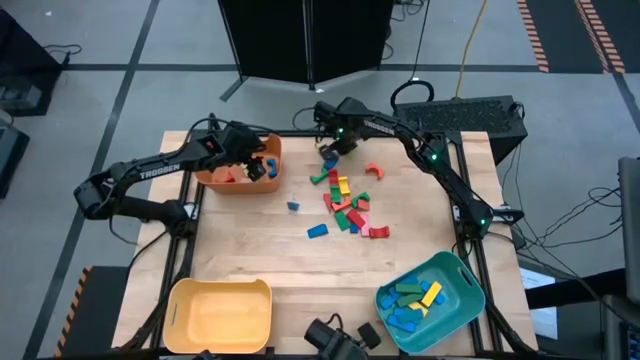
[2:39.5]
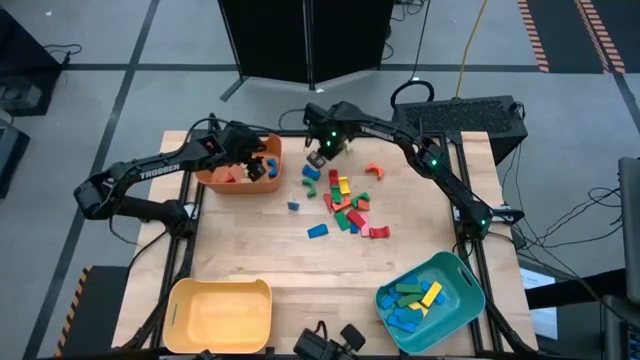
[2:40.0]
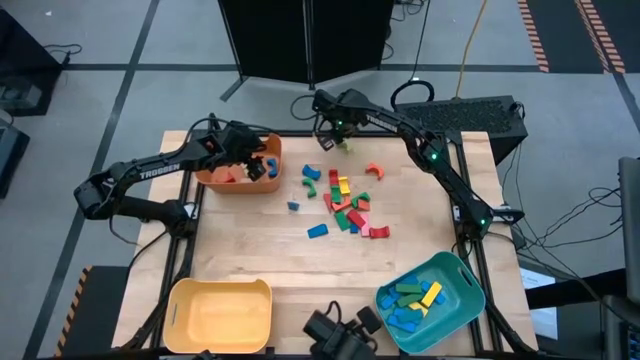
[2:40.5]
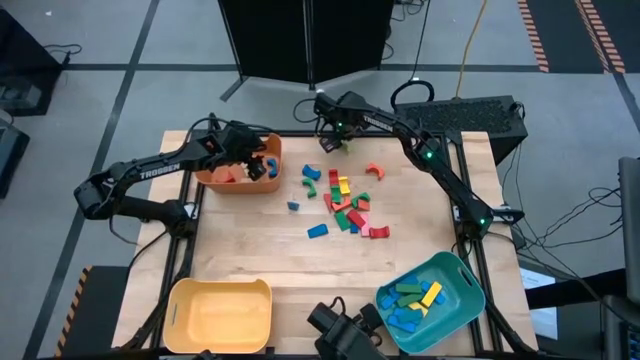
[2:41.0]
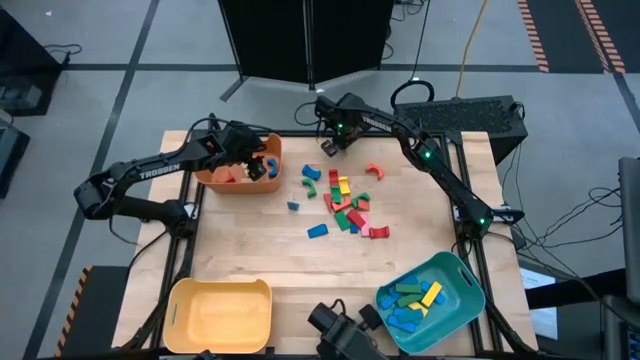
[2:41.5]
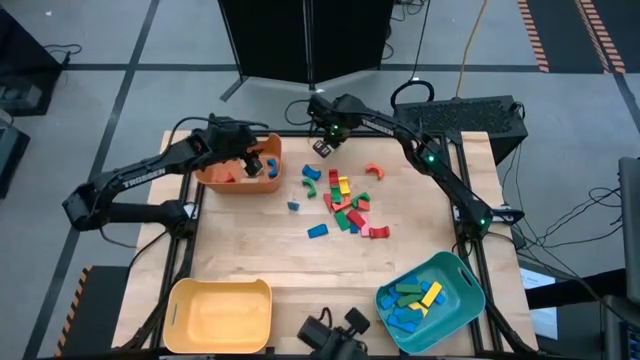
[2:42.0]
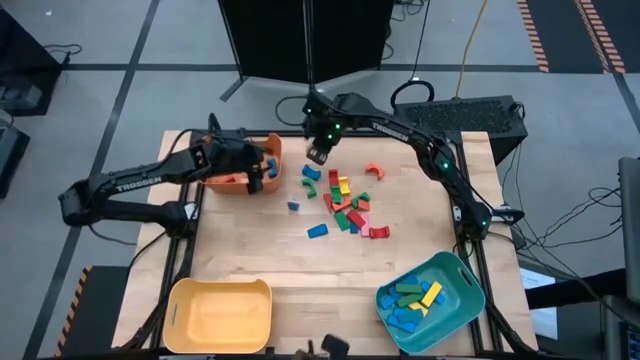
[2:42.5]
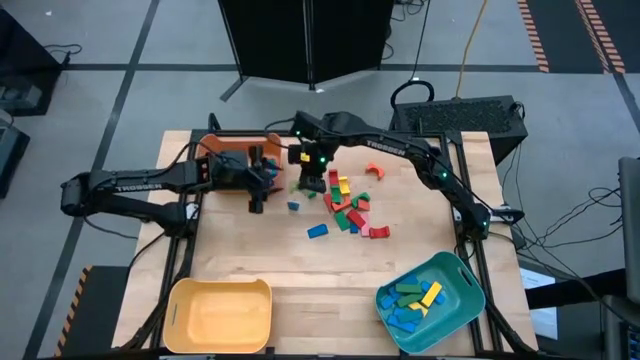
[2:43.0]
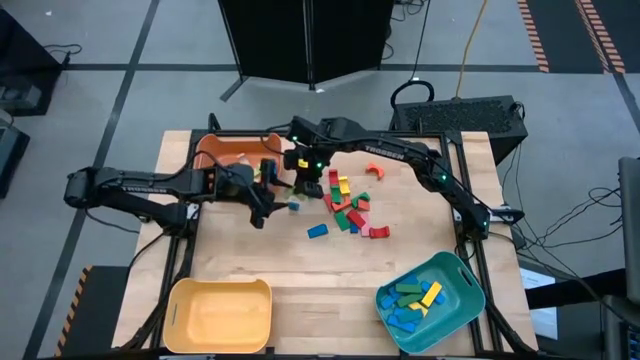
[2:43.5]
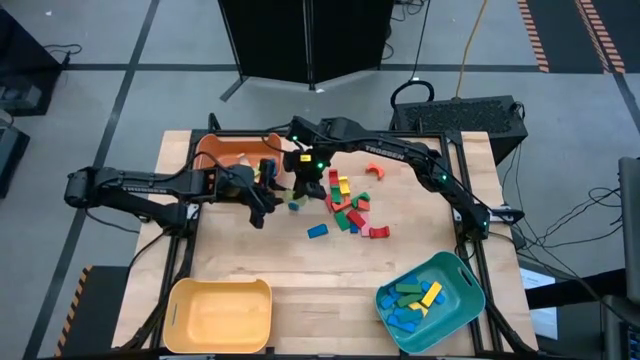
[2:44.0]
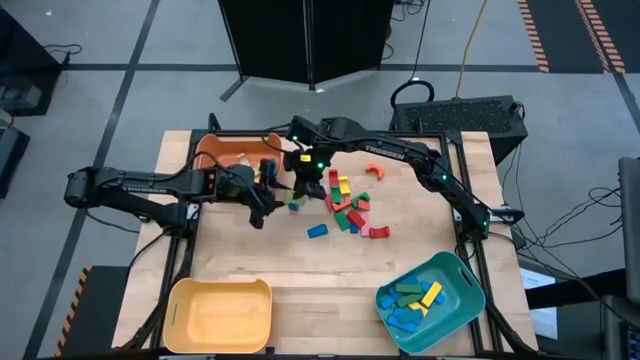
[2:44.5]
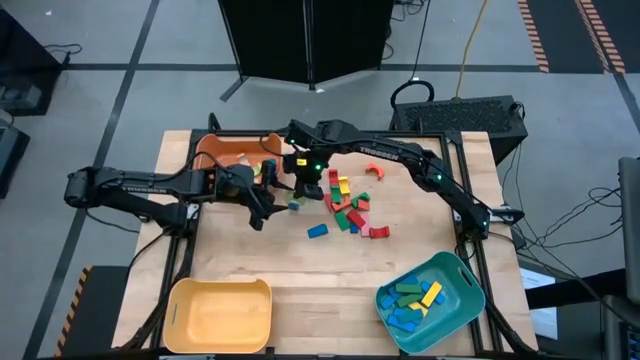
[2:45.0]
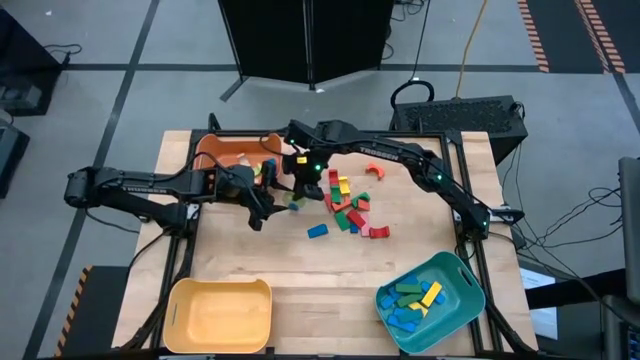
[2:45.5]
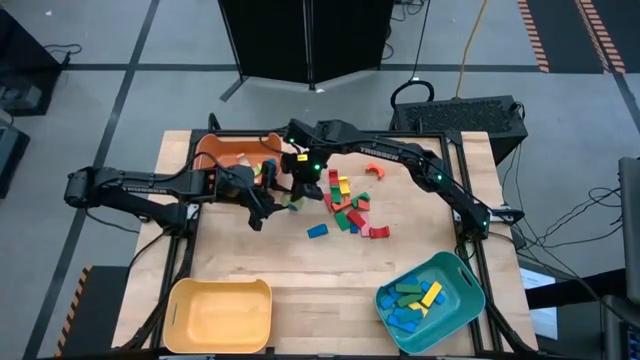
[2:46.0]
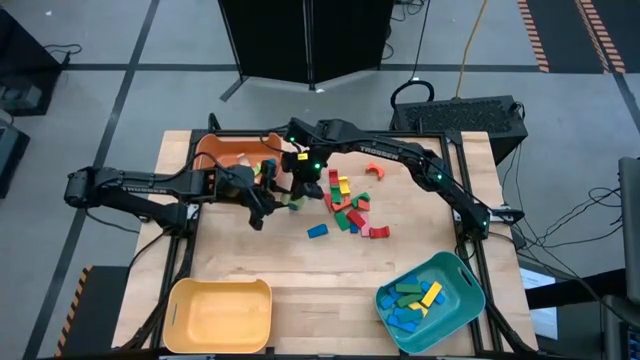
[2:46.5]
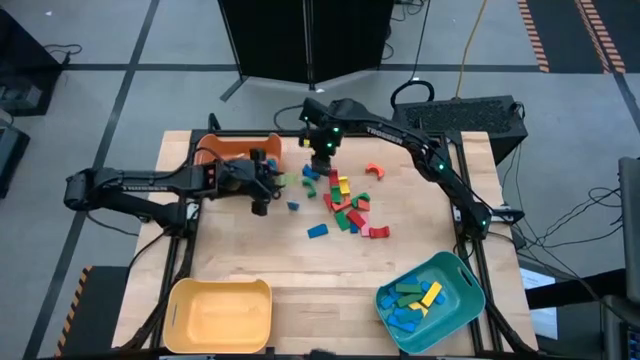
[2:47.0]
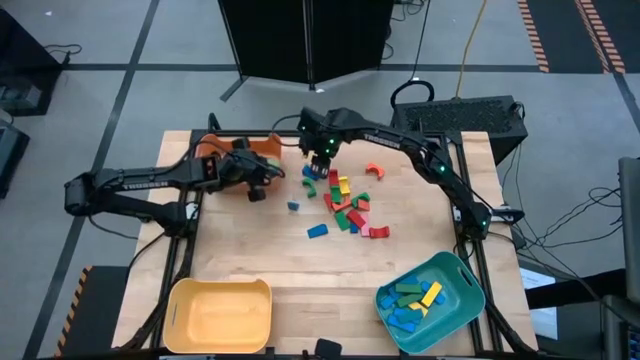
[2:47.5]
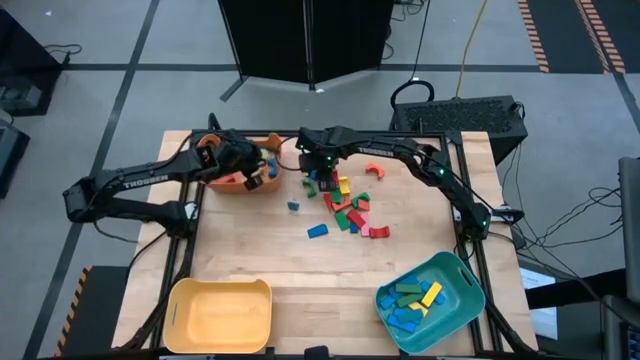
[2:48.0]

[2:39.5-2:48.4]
Task: Sort blocks by size
Put the light green arch block into the orange bin

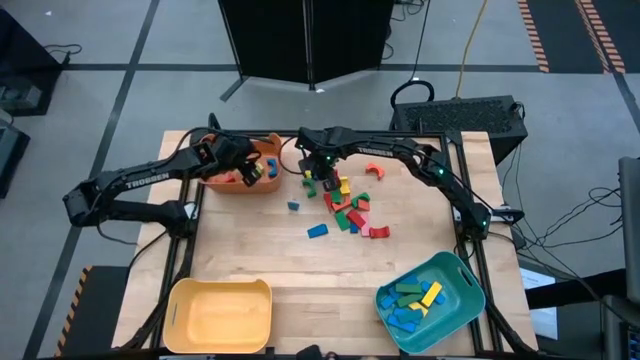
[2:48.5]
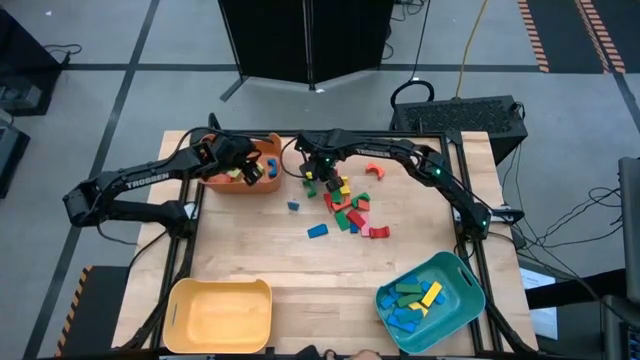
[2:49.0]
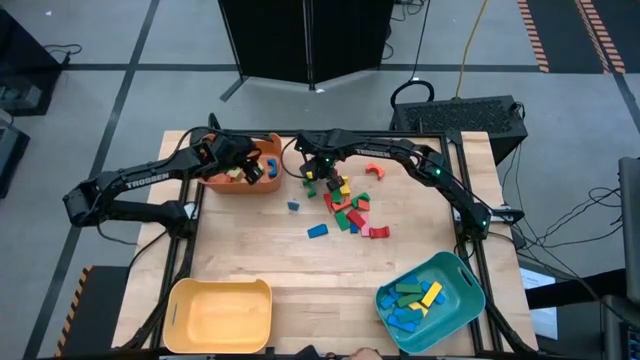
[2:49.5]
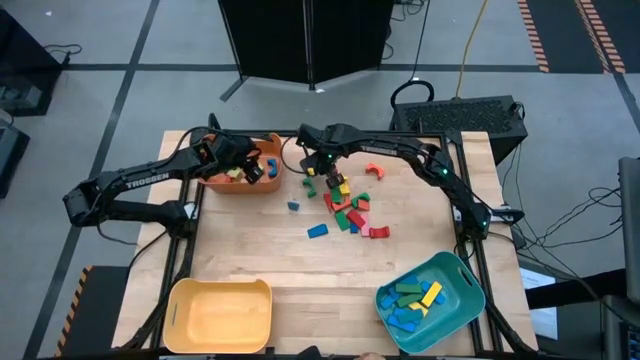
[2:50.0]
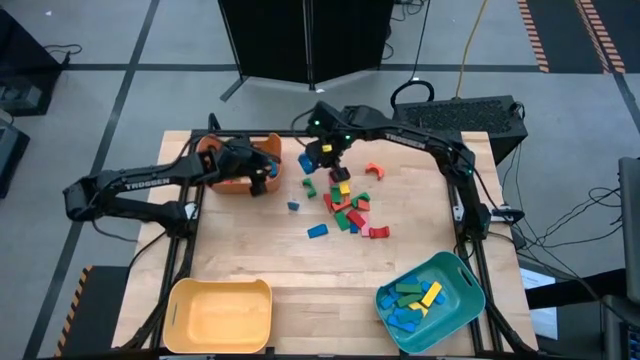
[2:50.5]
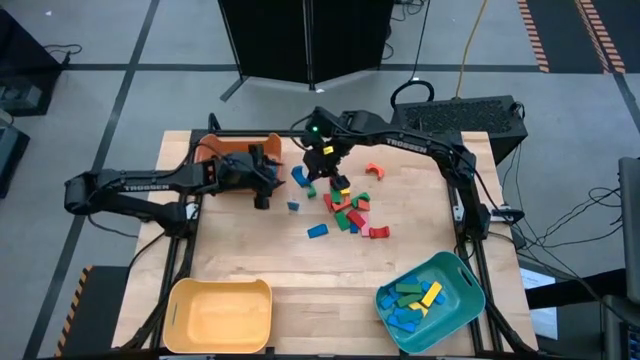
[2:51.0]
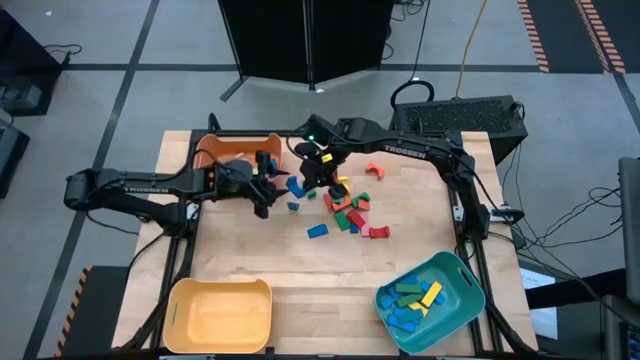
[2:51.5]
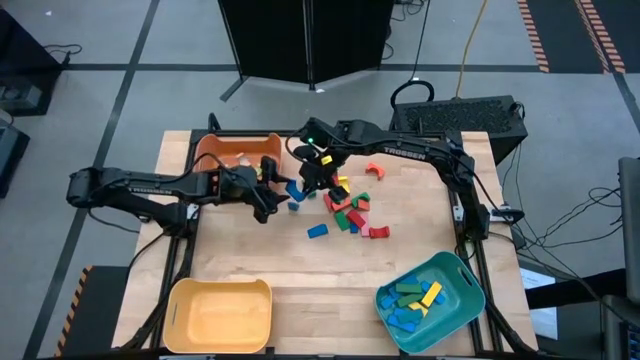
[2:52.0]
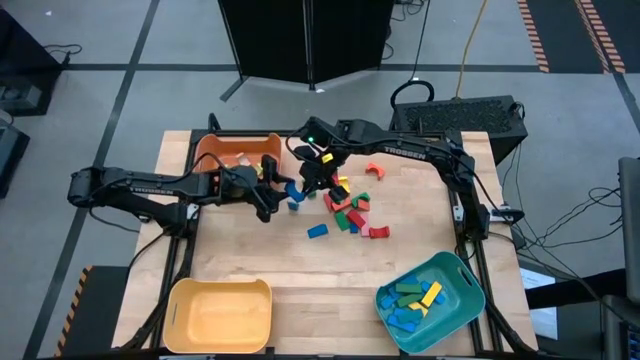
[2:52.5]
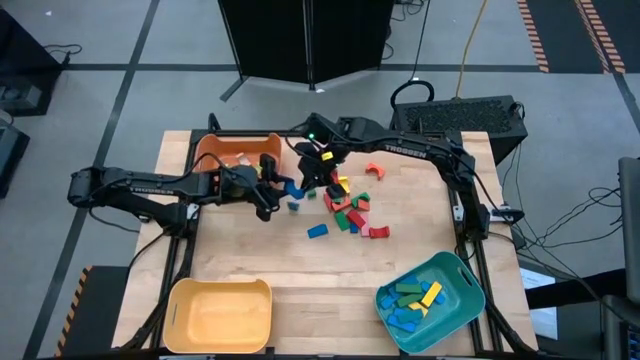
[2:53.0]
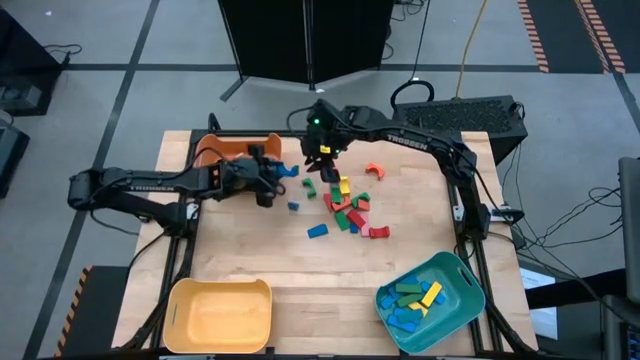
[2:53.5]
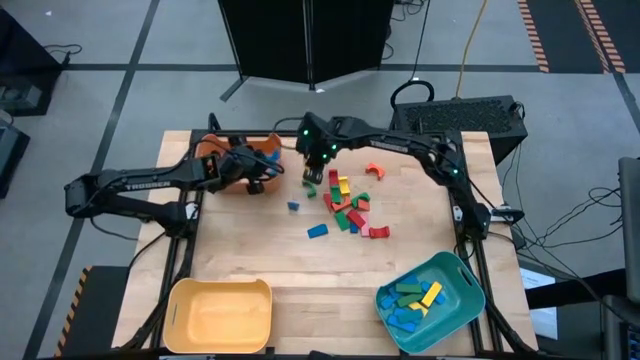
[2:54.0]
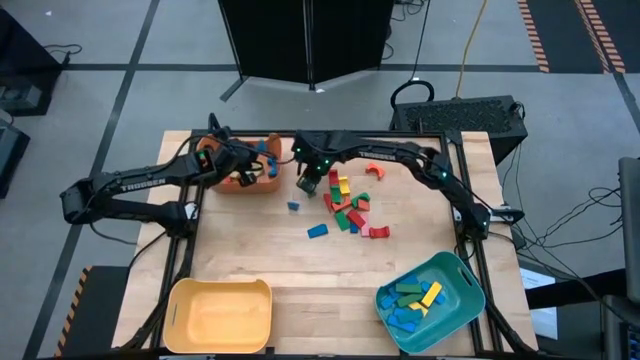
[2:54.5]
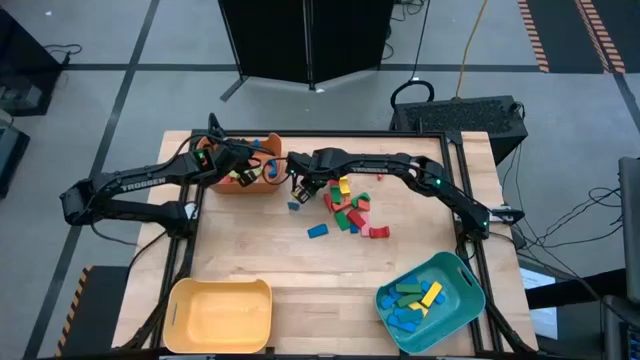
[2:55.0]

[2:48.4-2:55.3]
Put the blue arch block into the orange bin

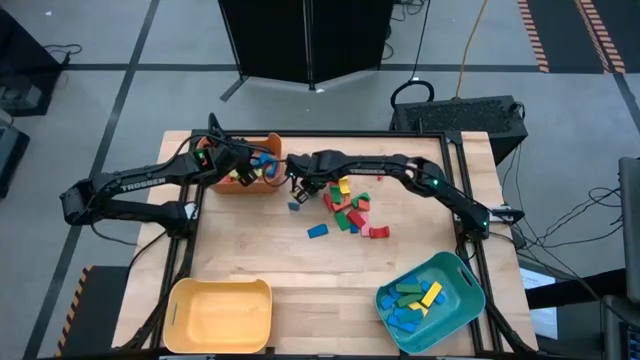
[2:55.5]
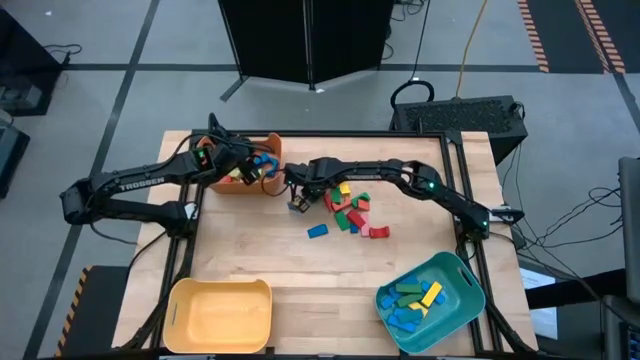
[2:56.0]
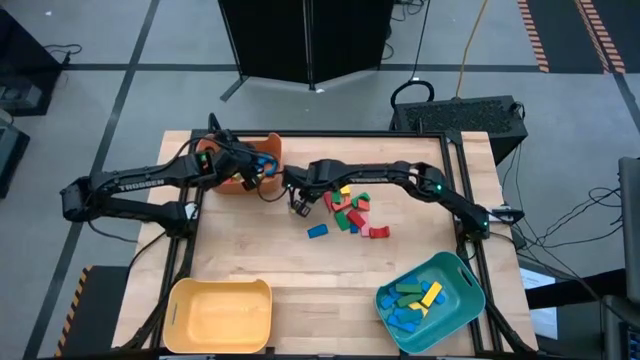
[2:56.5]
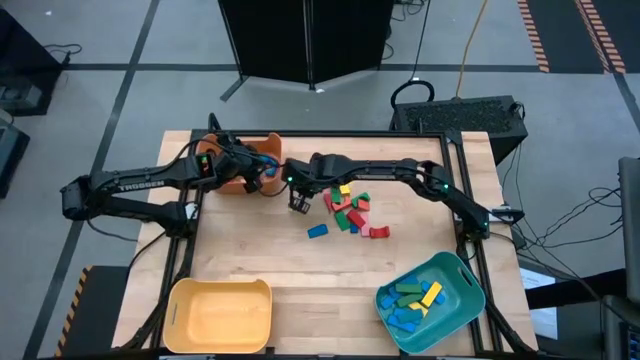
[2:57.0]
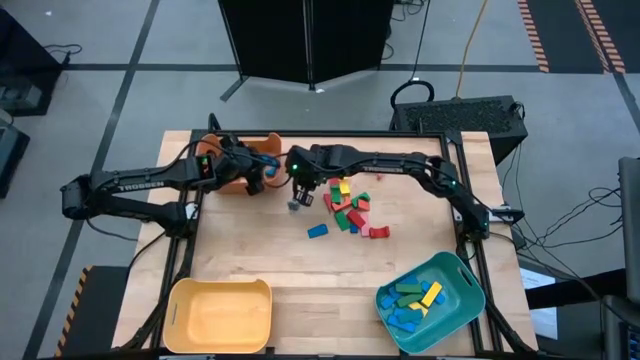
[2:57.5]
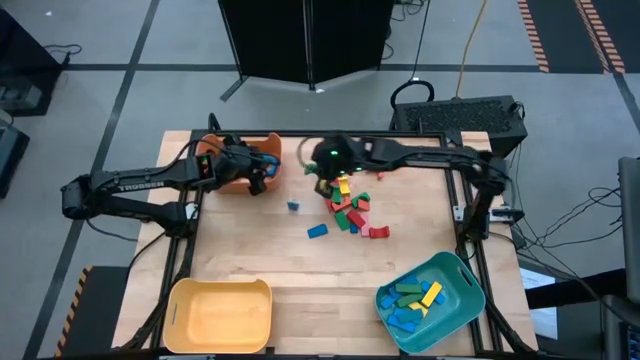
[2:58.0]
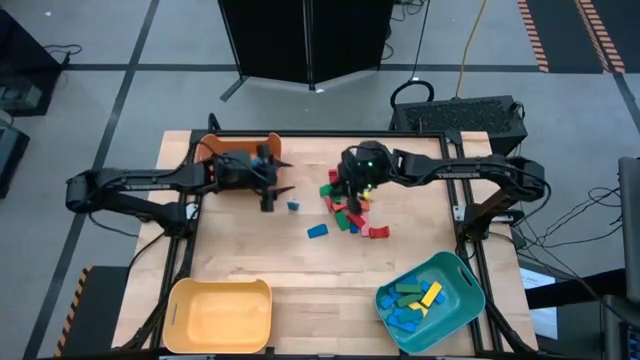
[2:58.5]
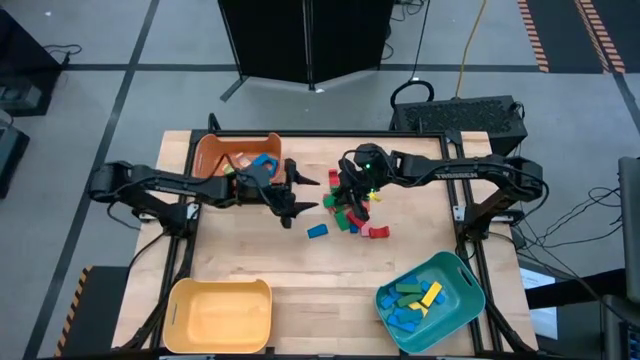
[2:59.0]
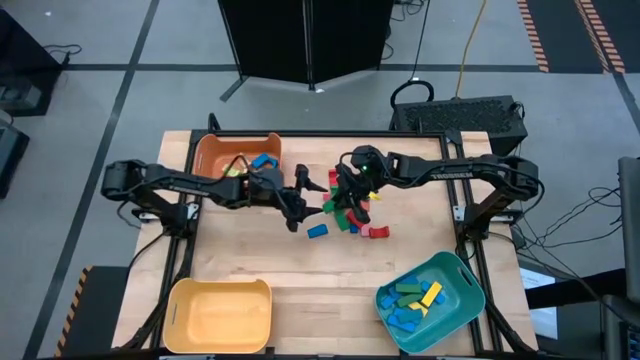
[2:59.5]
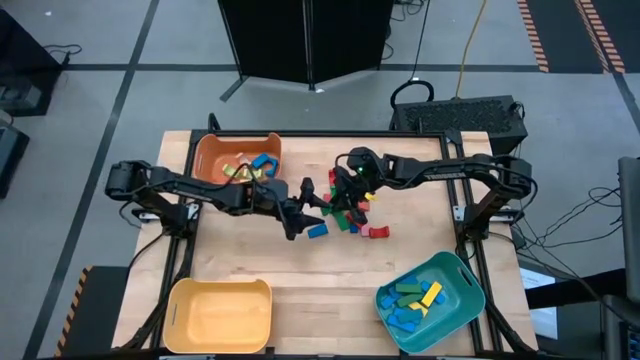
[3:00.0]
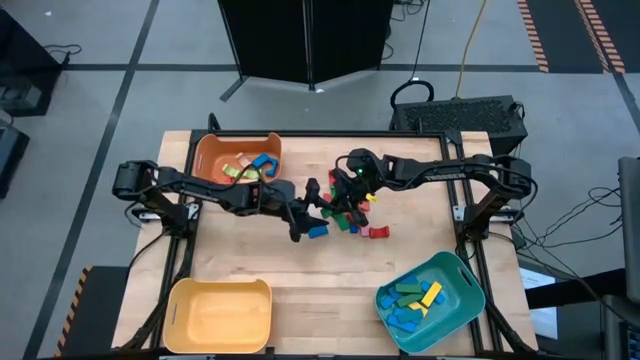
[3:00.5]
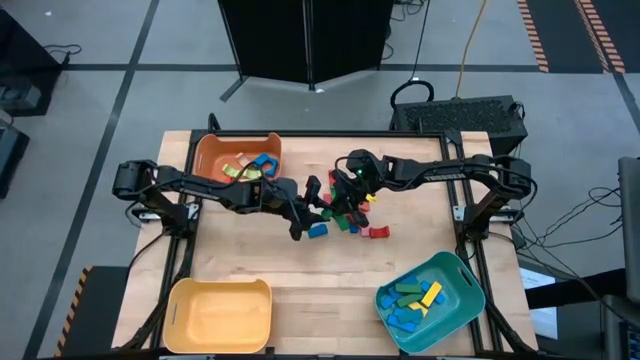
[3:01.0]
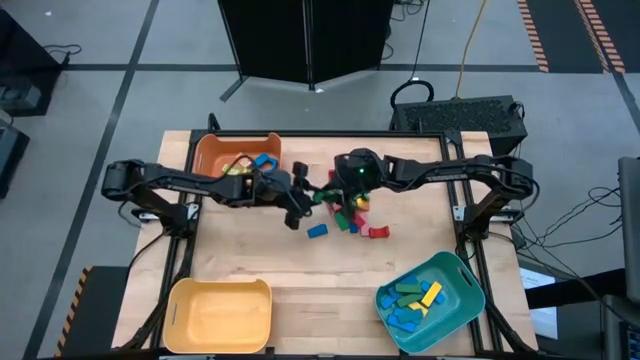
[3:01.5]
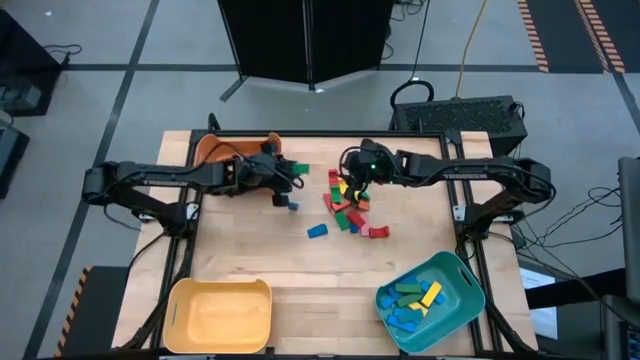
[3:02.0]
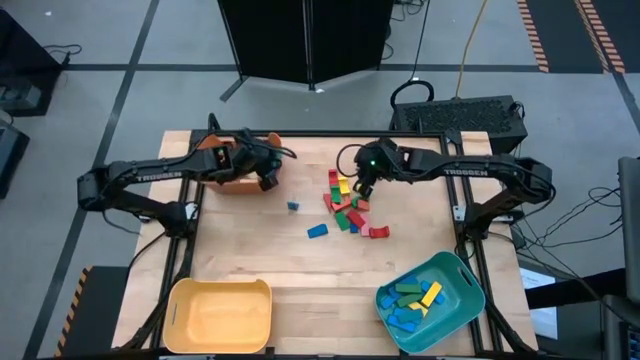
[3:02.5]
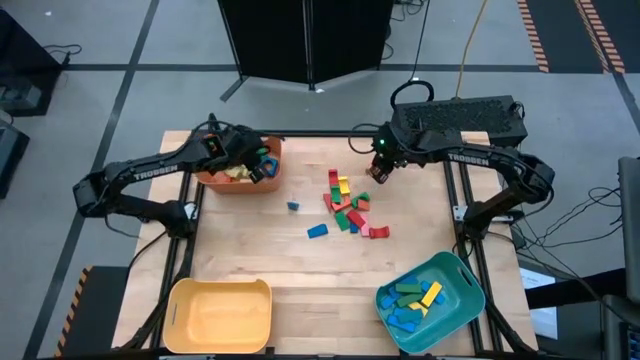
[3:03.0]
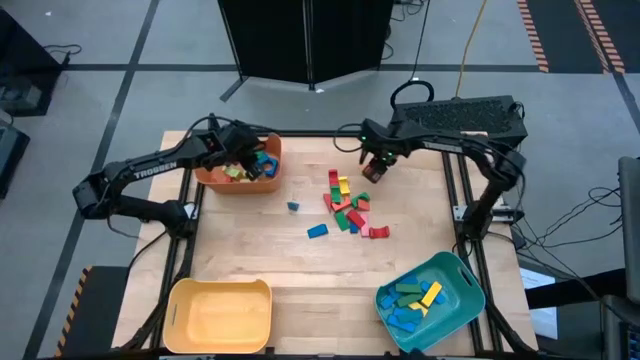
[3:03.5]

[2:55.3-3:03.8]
Put the dark green arch block into the orange bin
